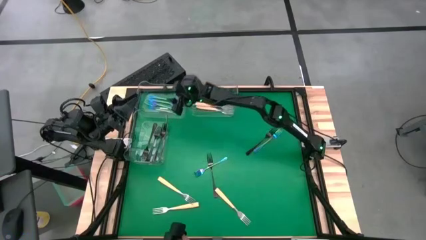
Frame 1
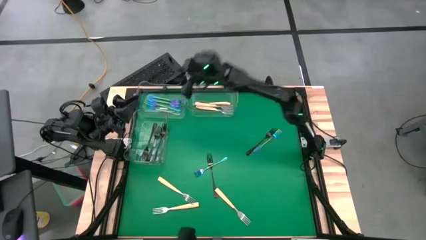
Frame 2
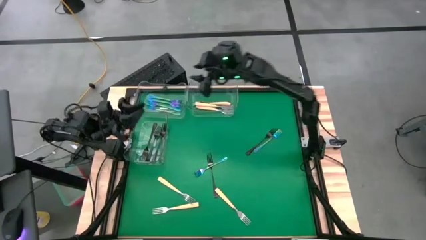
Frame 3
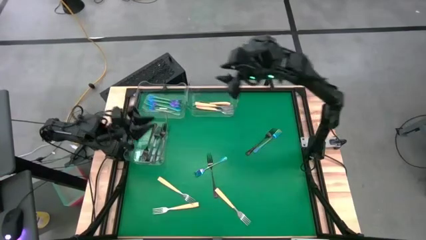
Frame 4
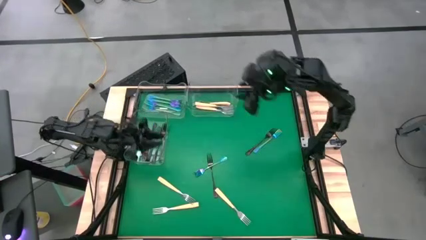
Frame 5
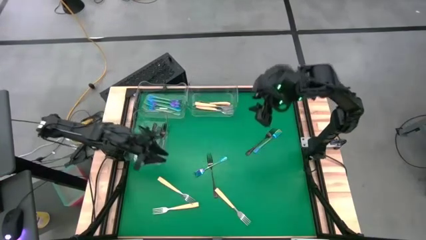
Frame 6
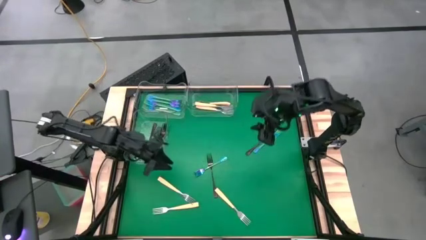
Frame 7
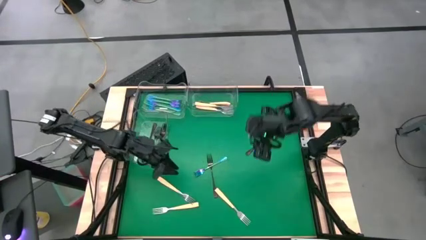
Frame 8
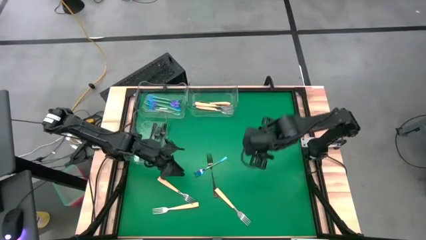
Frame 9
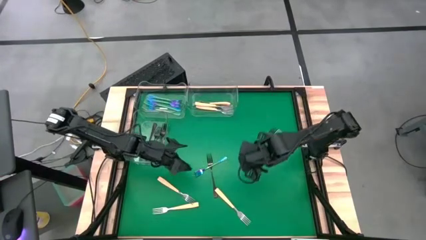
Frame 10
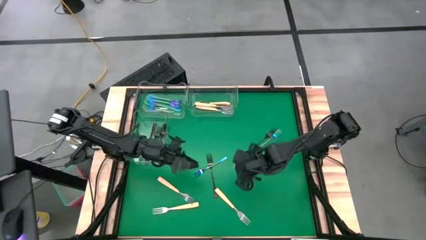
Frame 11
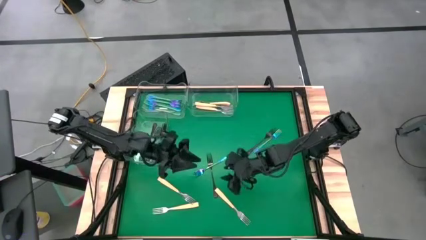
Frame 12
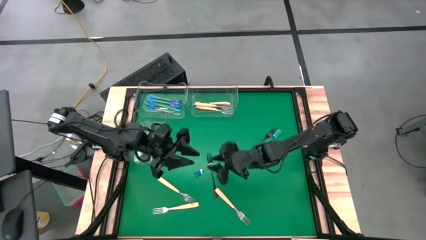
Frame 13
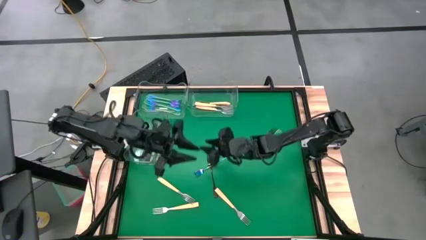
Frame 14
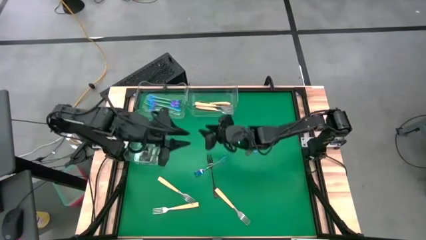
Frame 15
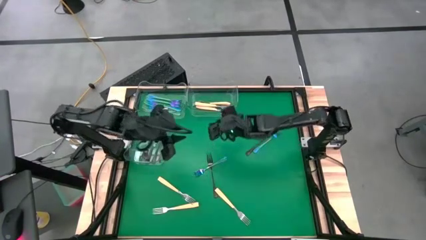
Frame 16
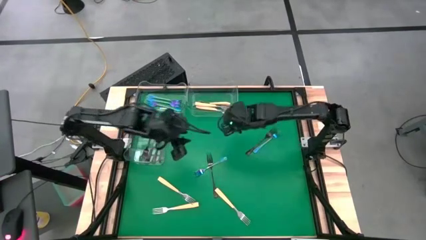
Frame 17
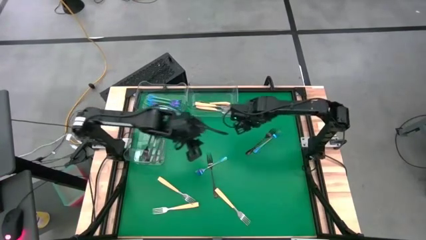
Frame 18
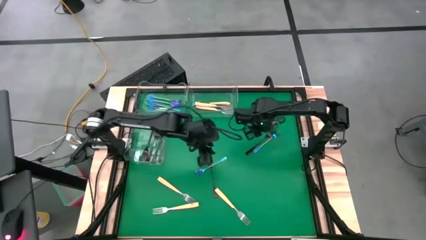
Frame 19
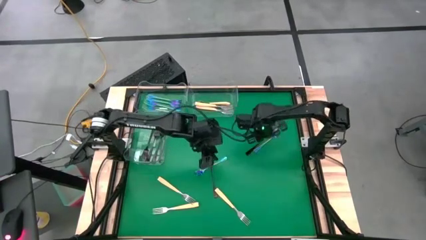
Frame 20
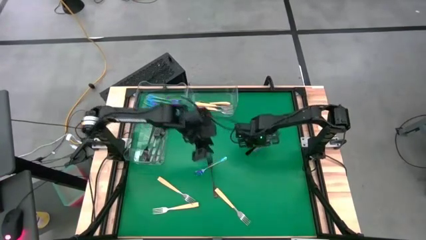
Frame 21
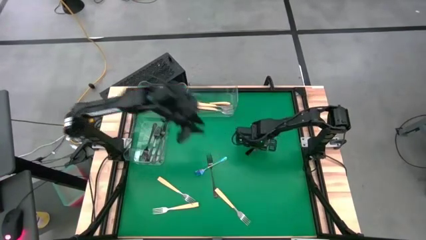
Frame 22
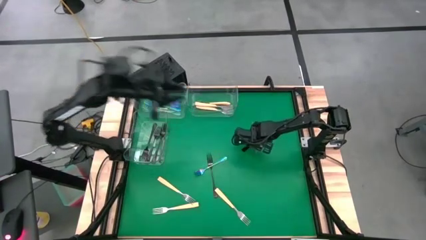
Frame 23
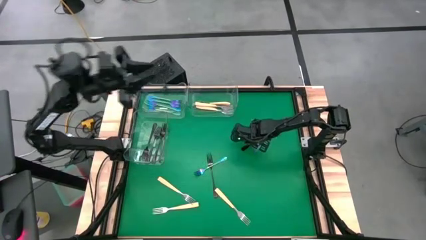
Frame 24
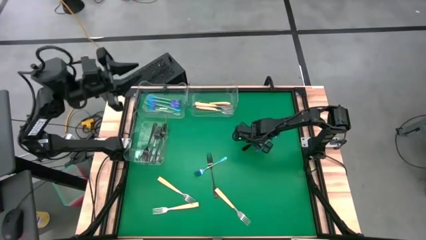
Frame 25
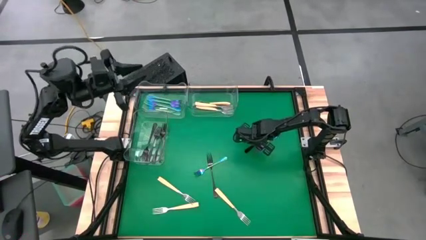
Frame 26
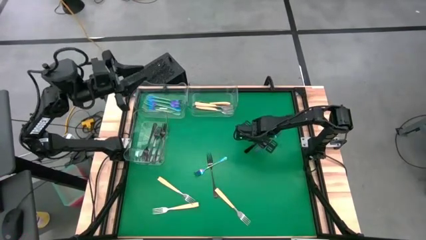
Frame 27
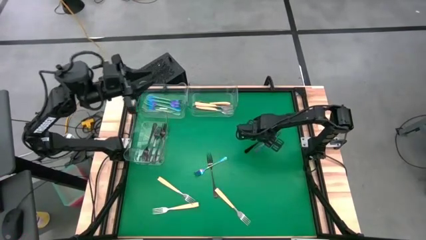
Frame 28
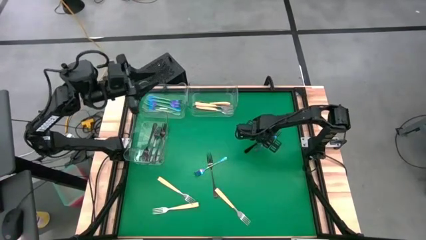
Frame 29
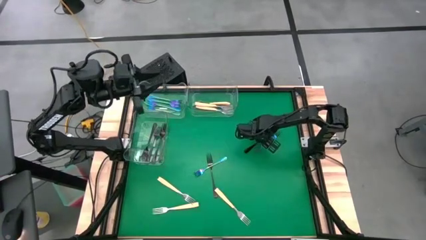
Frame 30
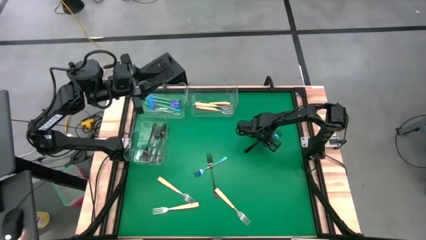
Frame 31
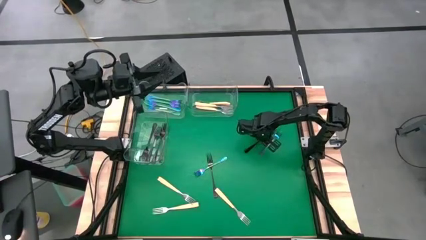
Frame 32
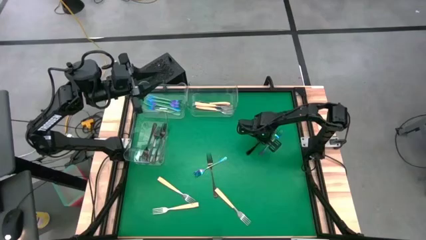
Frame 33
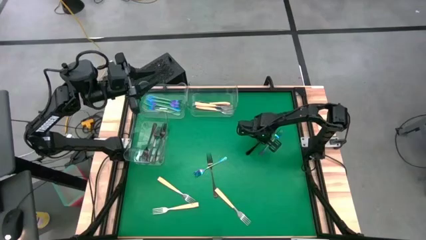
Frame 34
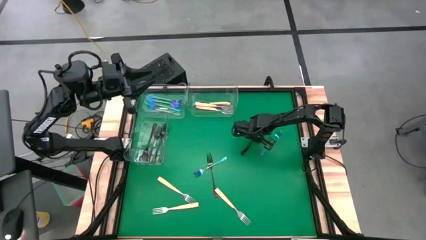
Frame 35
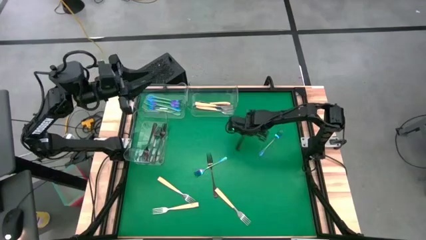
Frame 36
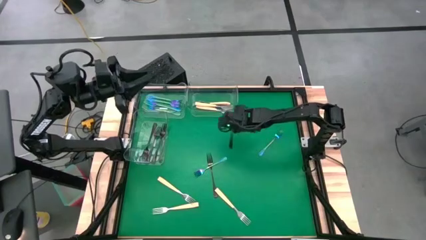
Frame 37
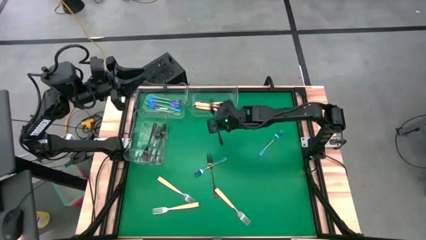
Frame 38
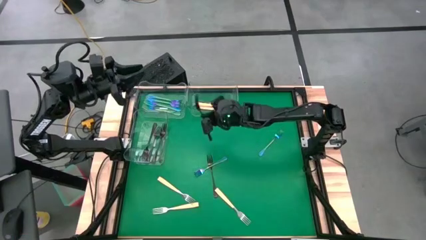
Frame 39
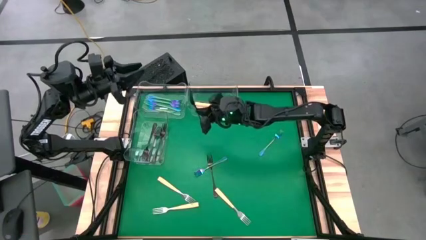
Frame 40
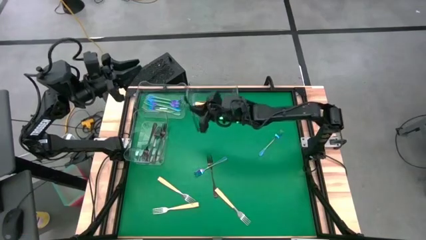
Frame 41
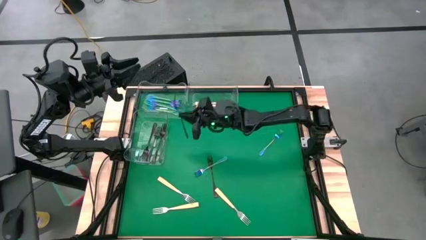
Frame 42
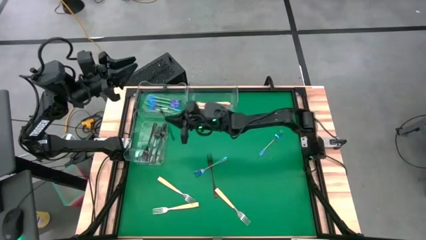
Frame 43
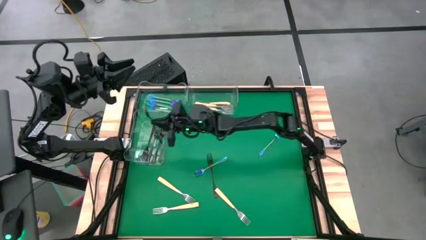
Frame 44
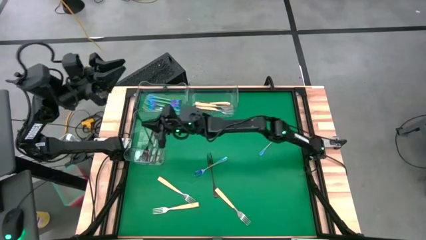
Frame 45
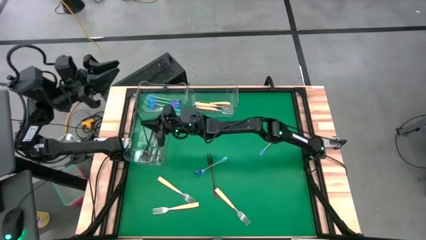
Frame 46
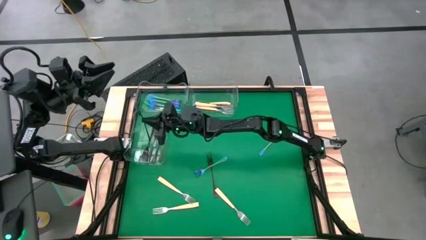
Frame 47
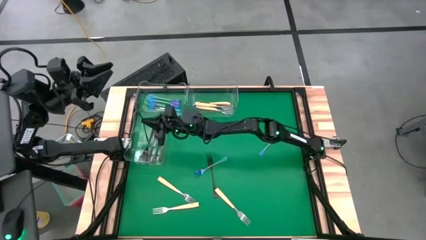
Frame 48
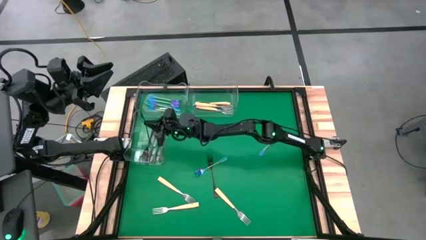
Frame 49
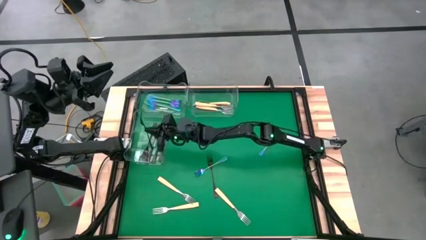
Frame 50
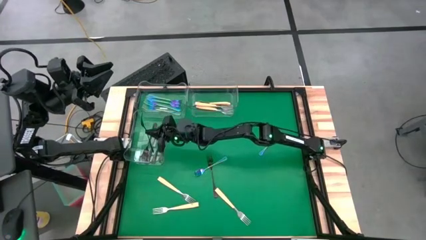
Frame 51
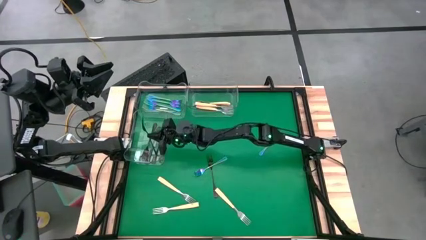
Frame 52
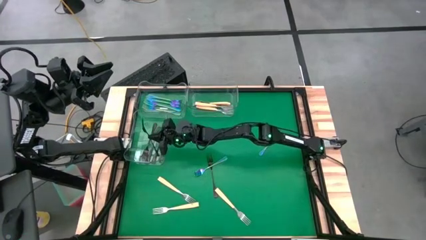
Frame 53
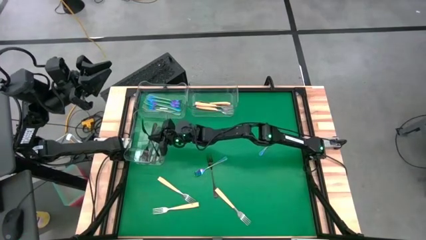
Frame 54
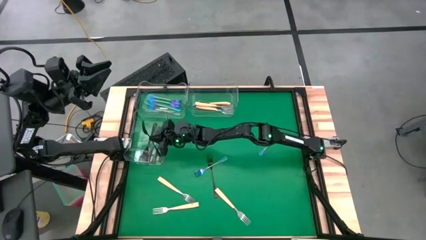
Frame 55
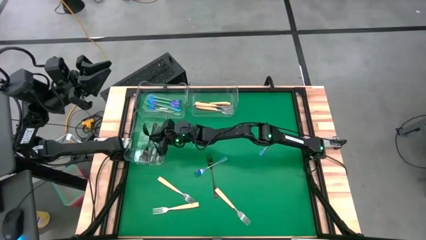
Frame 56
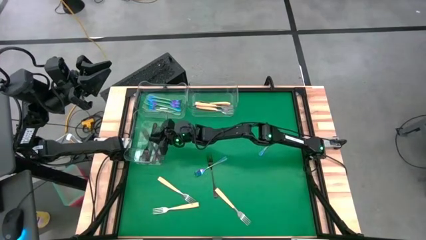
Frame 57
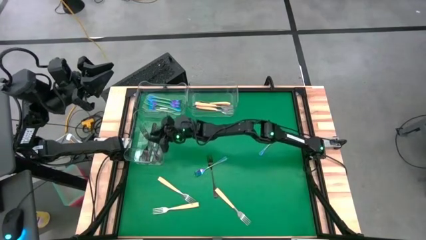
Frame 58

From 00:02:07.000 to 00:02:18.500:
Task: Sort silverware by color (type)
Put the black fork into the middle left transparent bin
